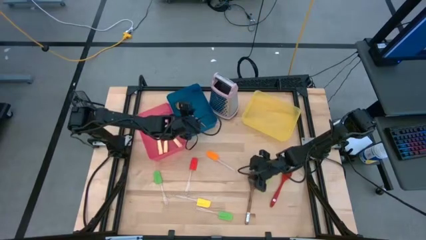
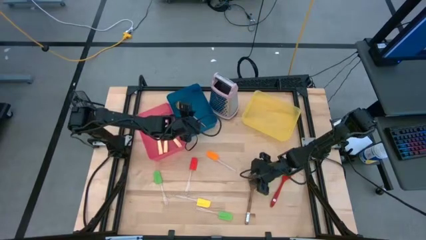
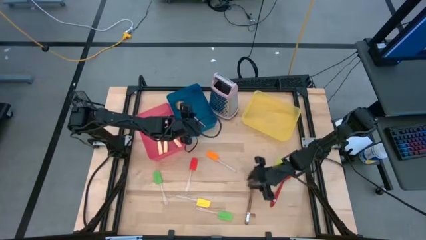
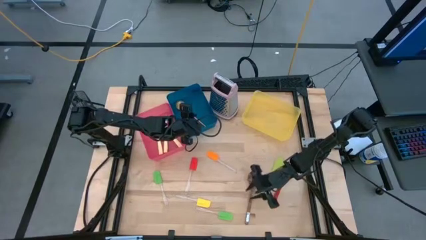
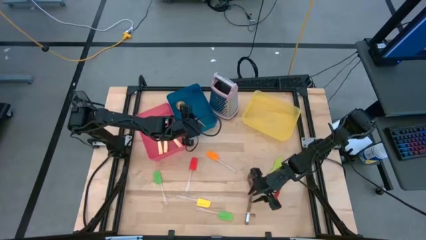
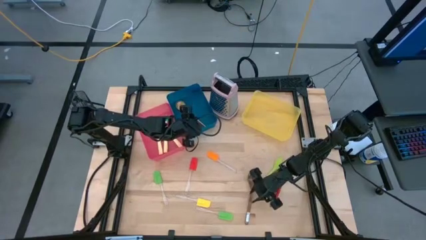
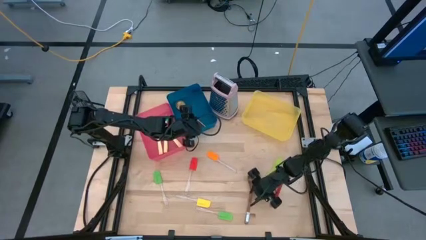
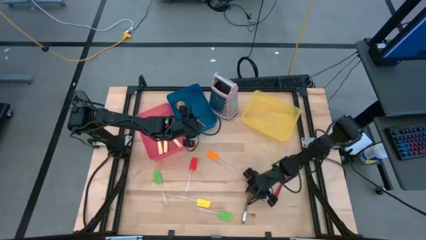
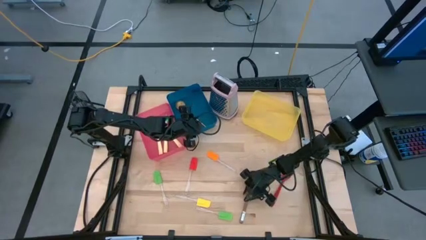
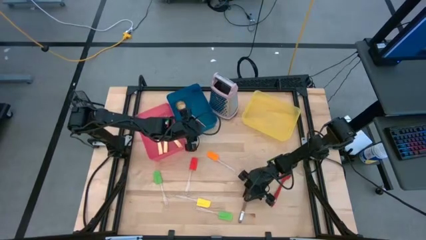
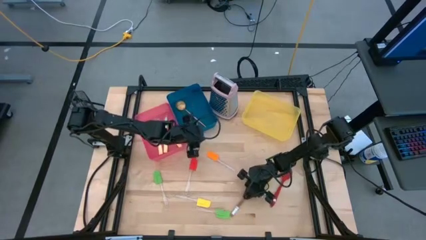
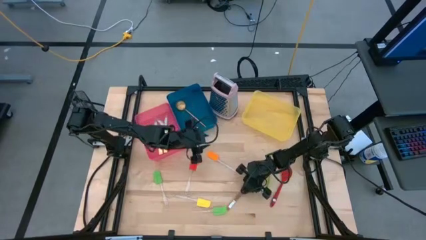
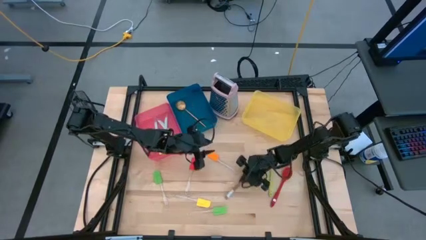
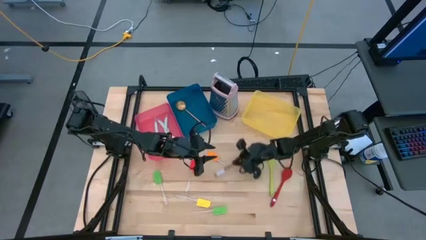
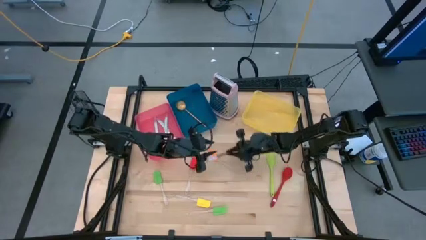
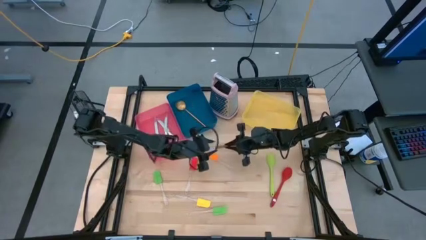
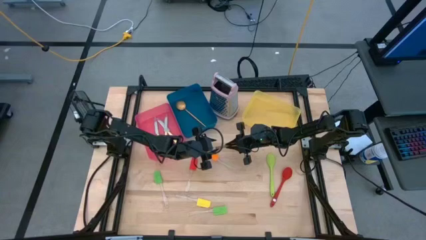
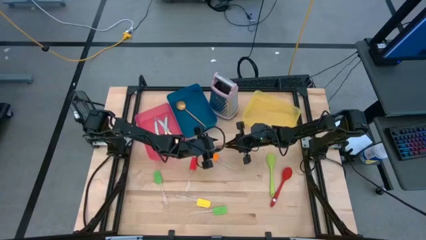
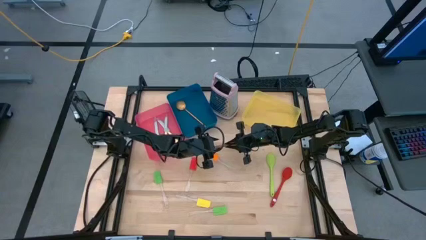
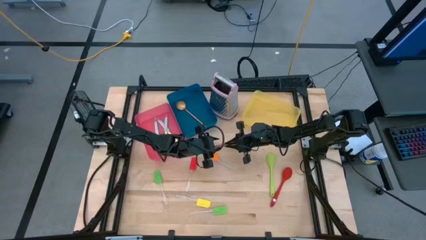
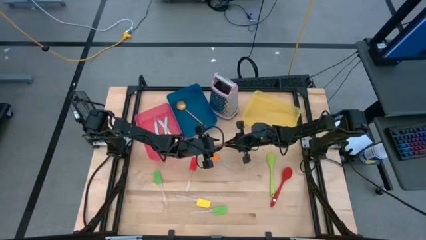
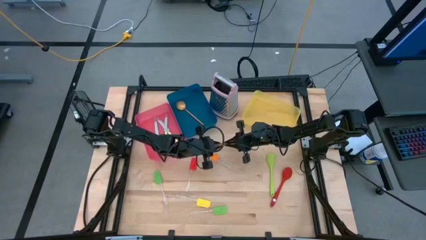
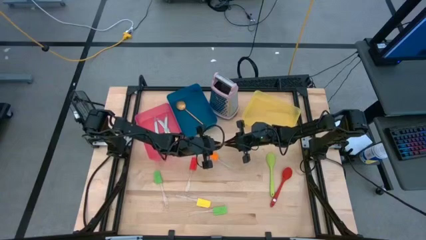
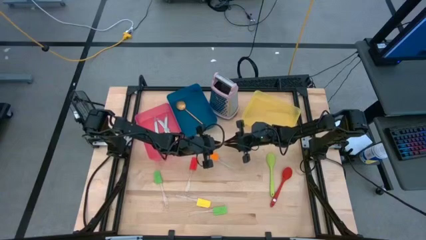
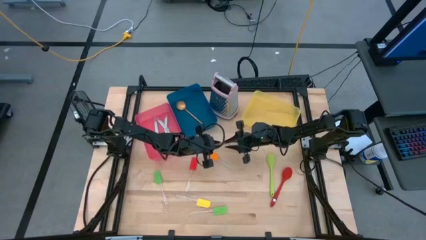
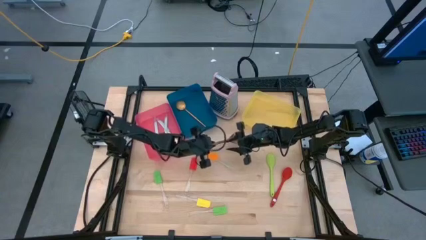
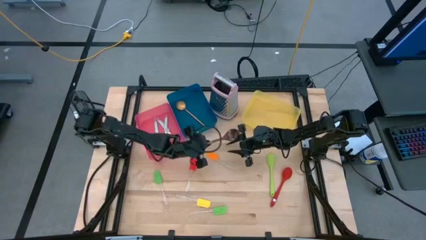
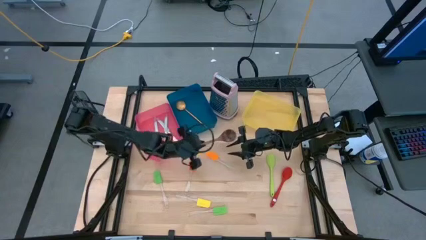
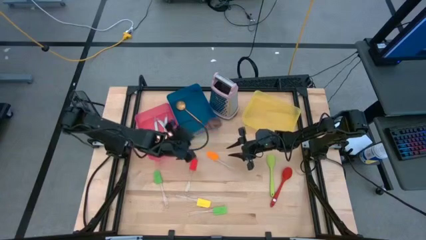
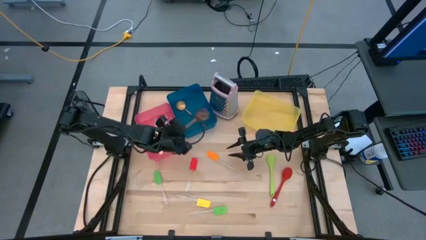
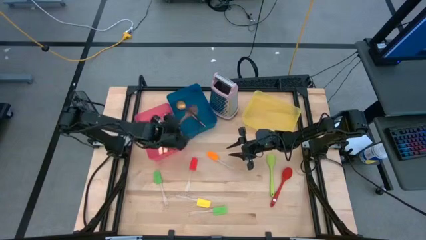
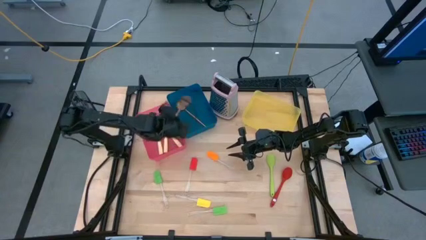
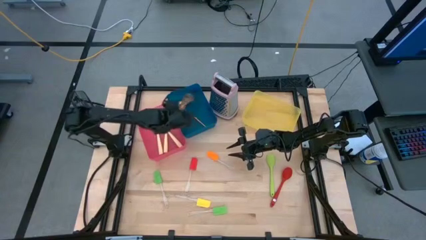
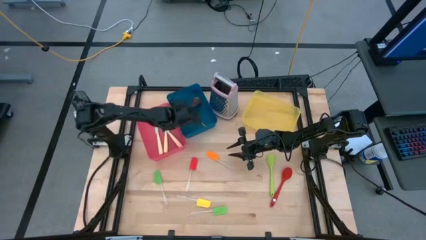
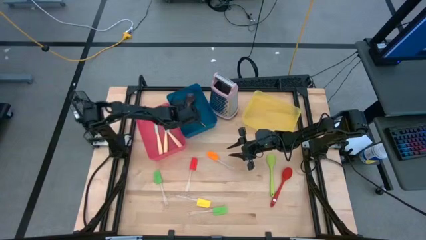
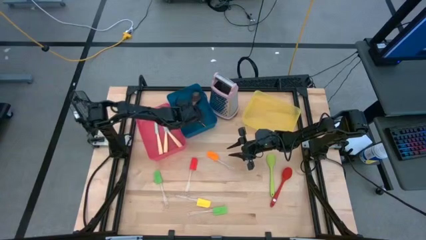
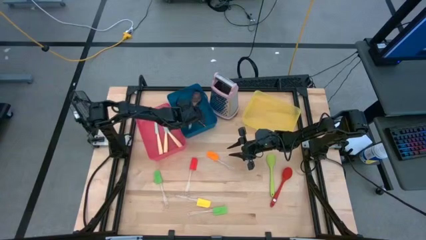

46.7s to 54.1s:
Task: Pick & Place Kitchen Items
Put the wooden spoon into the blue bin

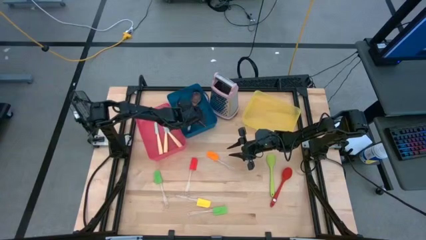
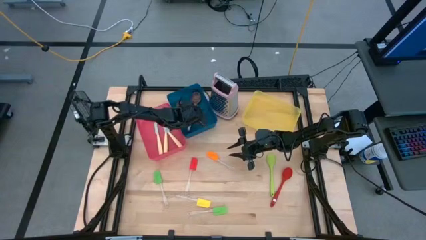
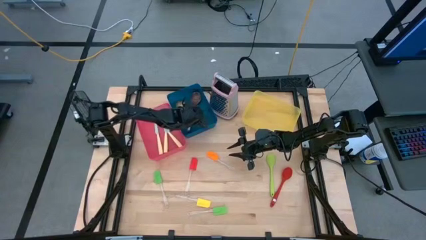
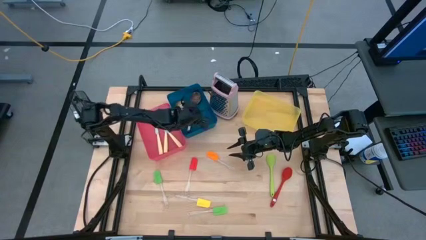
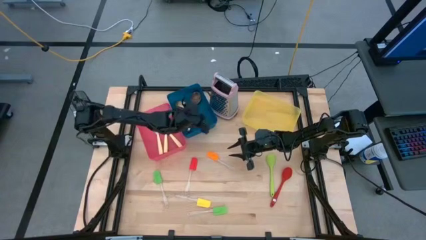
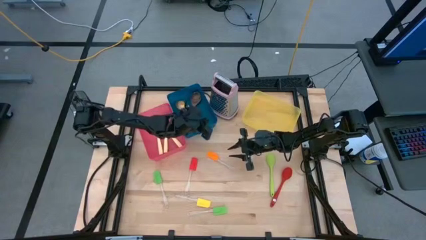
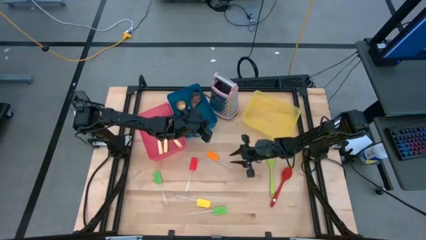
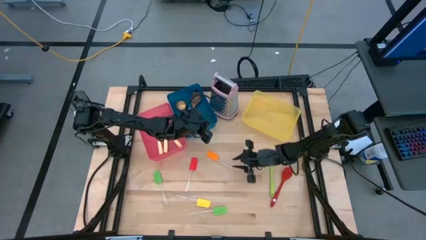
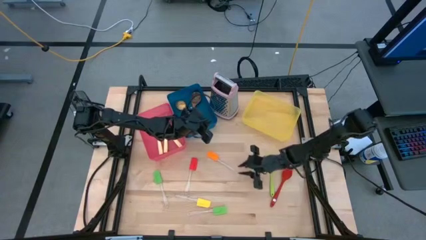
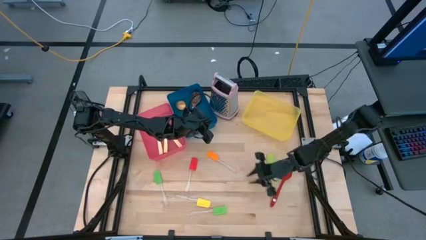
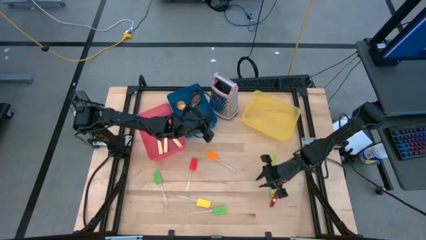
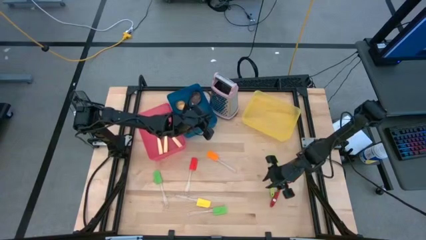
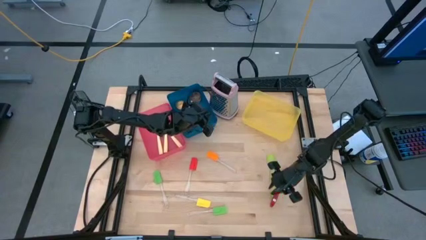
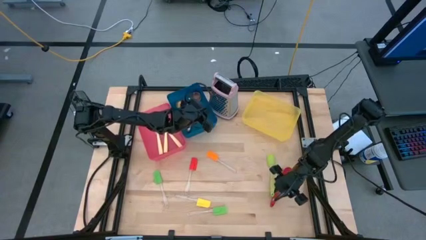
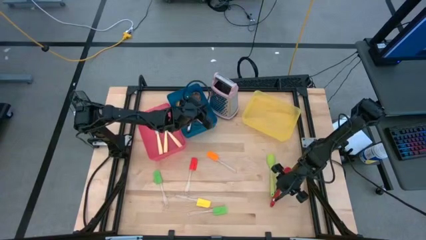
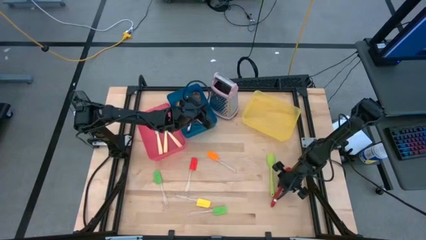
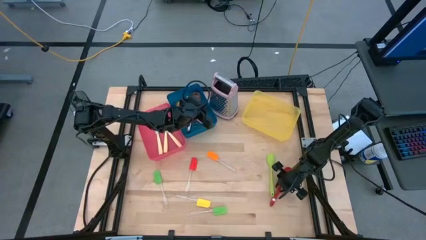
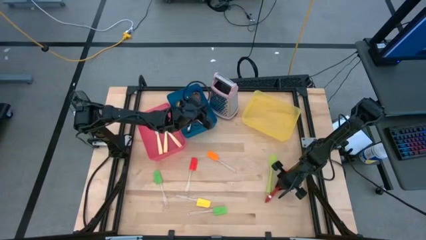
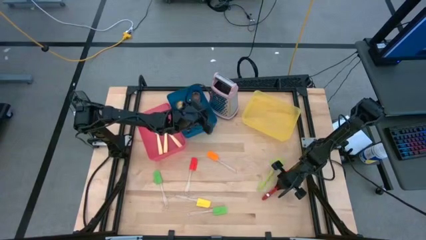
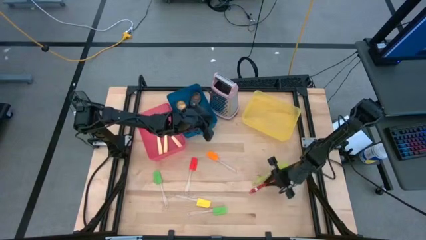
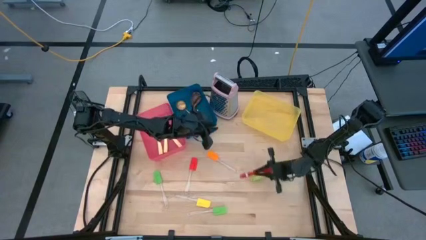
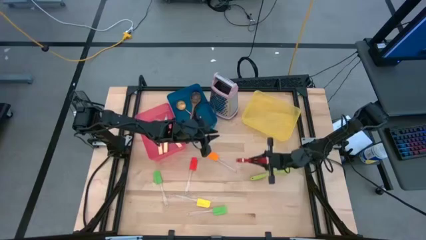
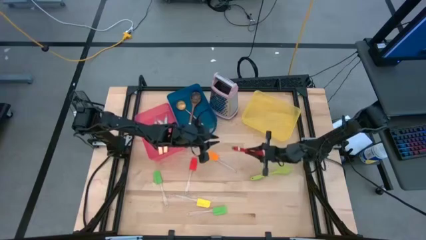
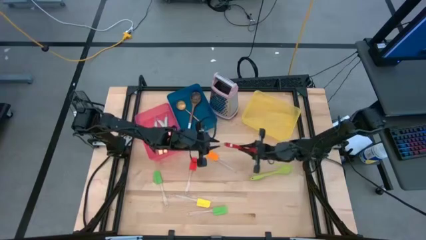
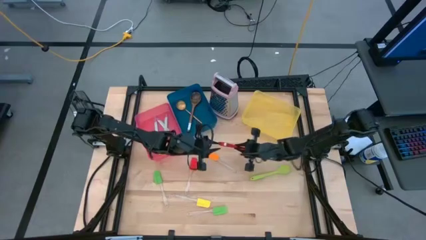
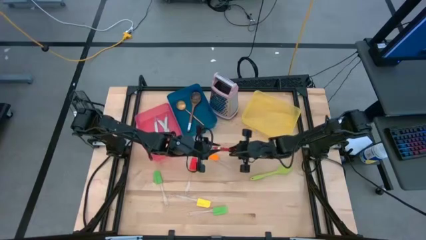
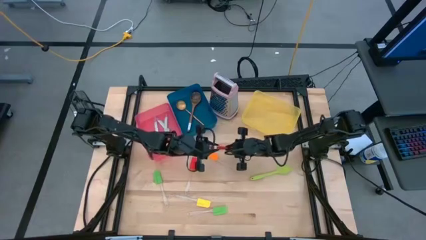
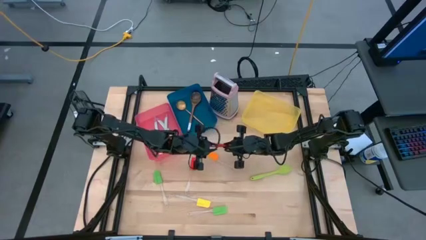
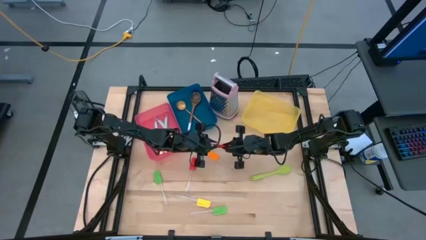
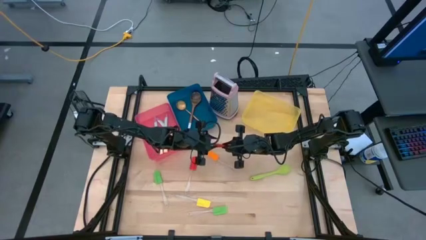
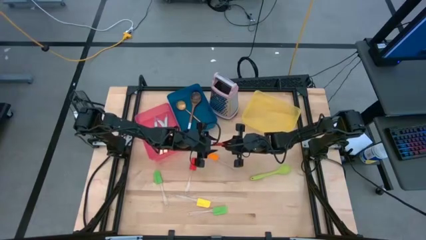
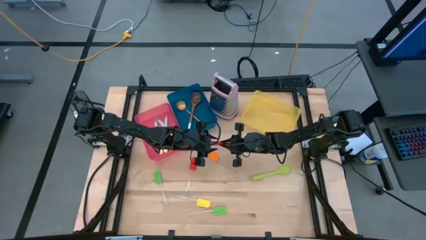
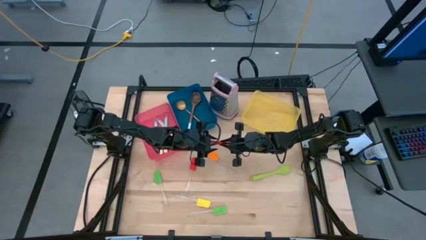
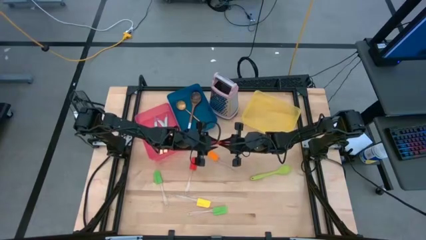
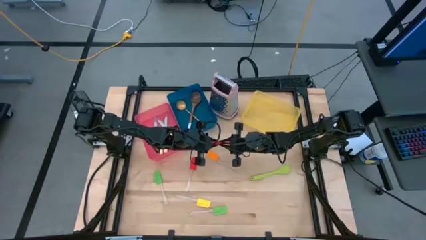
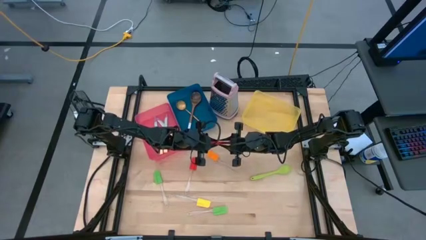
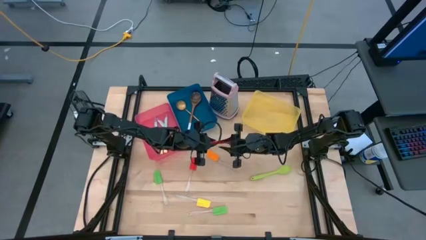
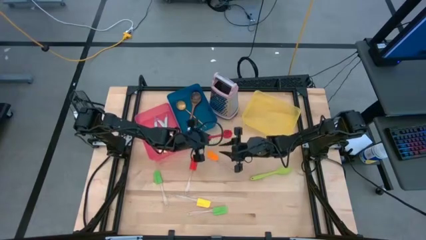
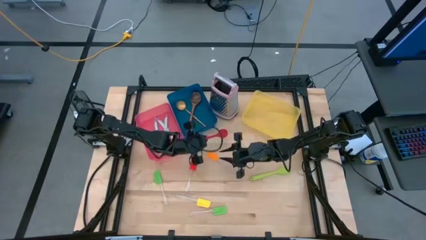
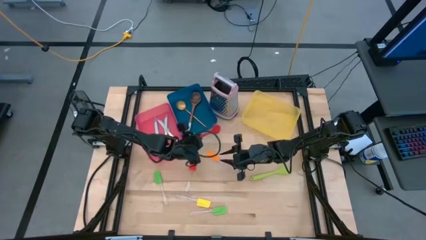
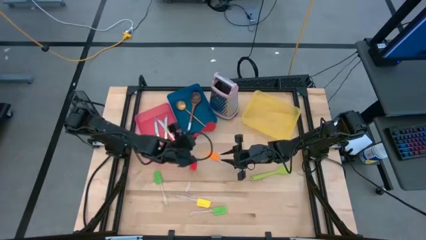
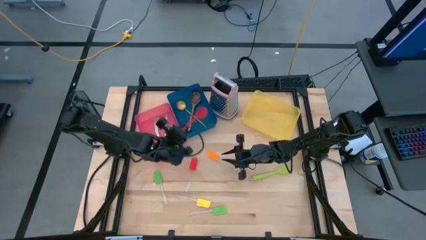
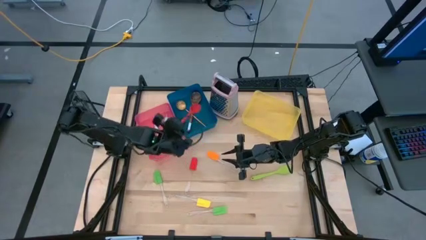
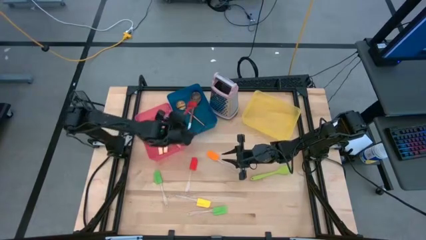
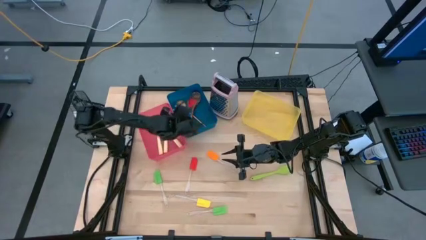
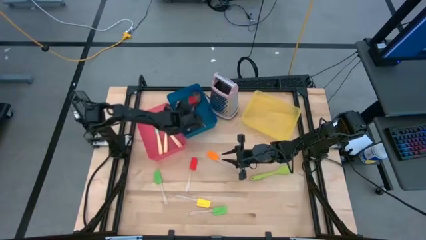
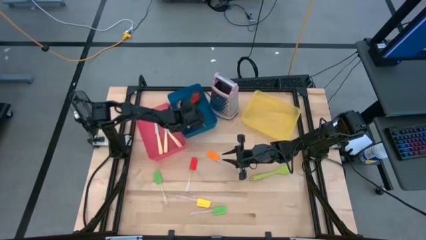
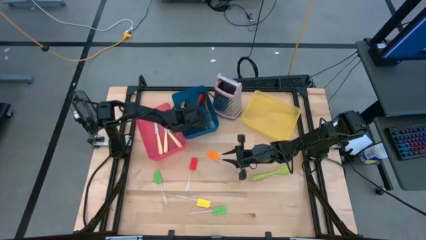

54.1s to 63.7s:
Put the red spoon into the blue bin
